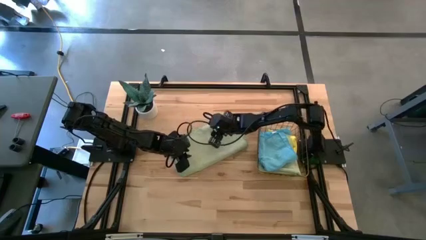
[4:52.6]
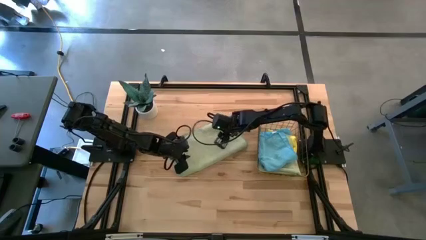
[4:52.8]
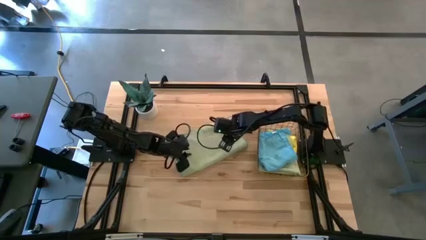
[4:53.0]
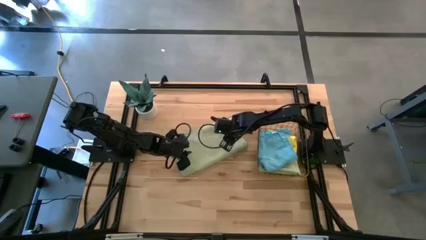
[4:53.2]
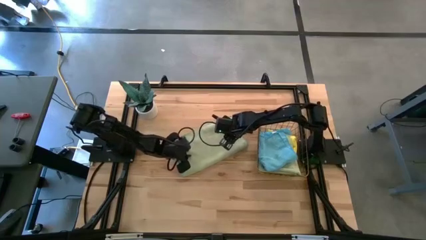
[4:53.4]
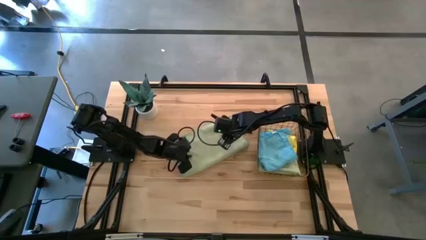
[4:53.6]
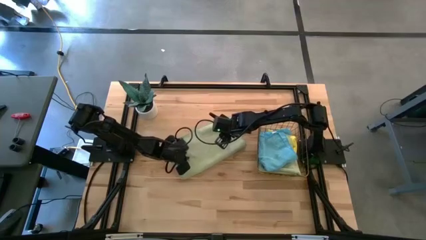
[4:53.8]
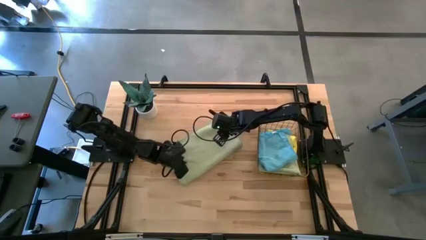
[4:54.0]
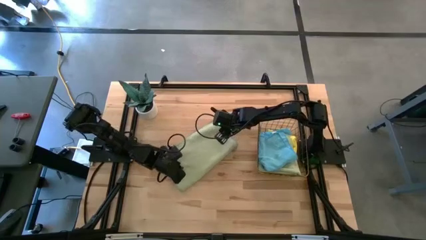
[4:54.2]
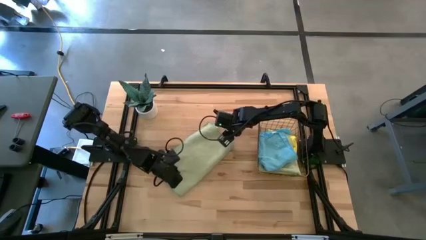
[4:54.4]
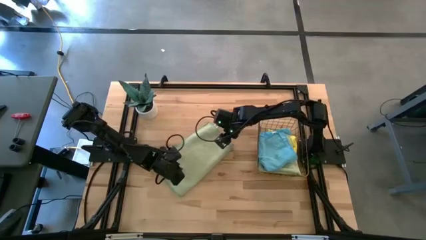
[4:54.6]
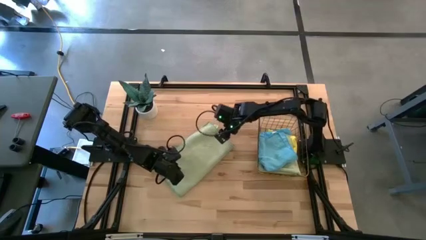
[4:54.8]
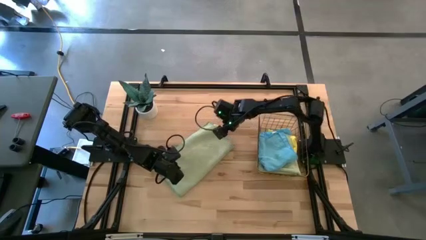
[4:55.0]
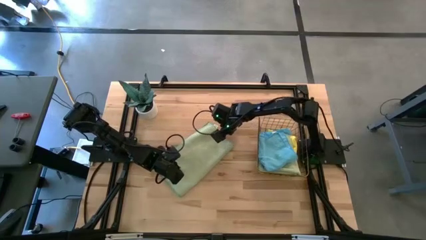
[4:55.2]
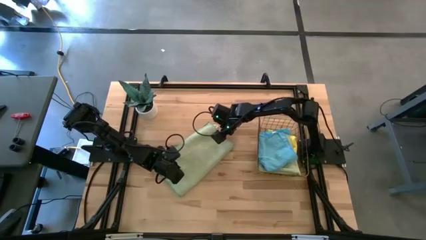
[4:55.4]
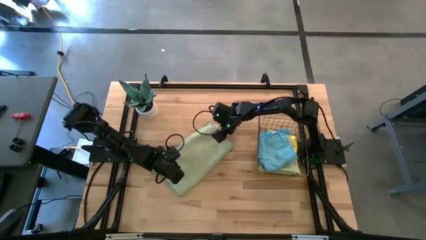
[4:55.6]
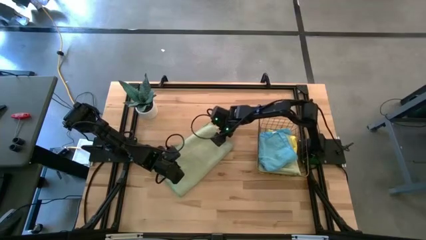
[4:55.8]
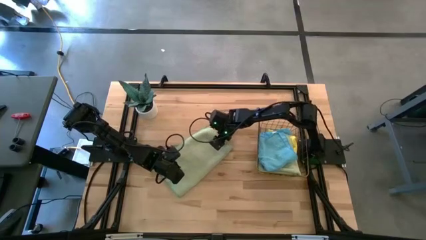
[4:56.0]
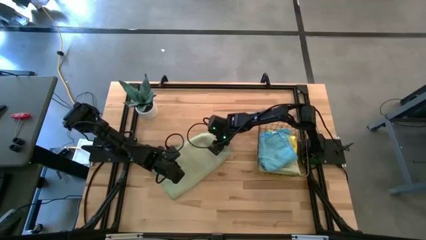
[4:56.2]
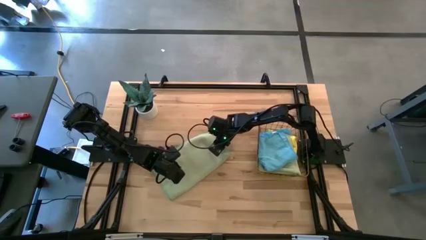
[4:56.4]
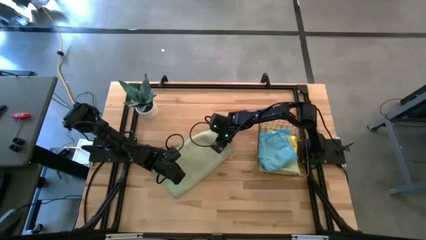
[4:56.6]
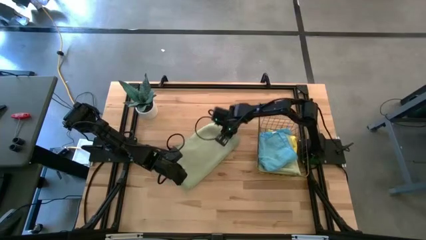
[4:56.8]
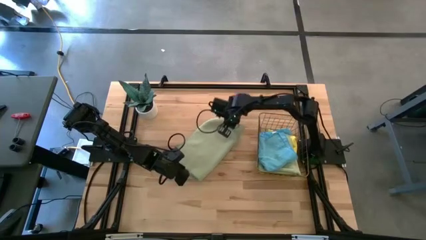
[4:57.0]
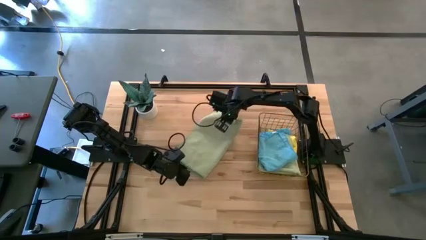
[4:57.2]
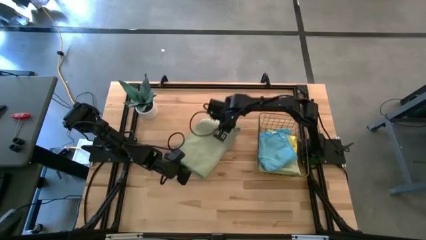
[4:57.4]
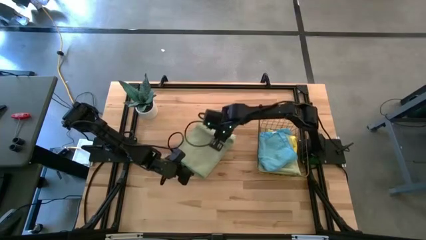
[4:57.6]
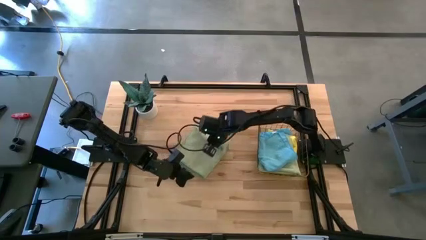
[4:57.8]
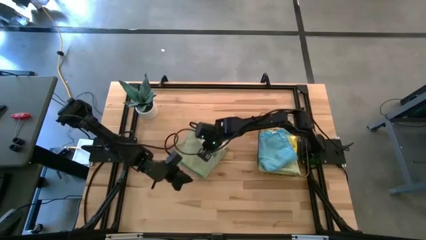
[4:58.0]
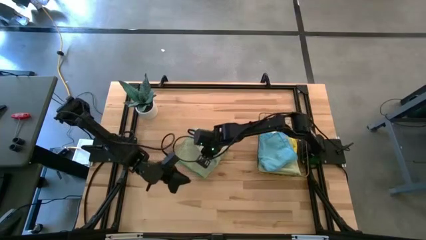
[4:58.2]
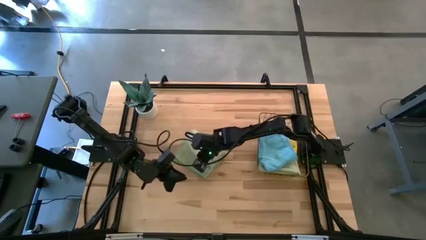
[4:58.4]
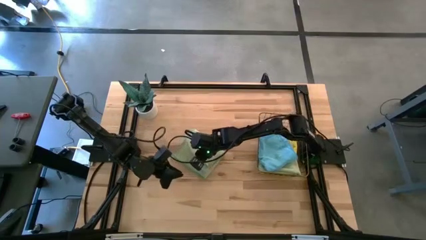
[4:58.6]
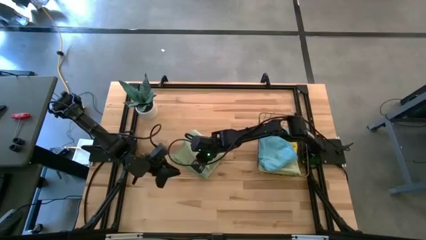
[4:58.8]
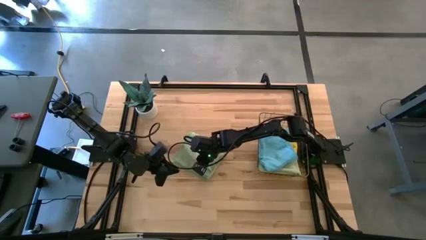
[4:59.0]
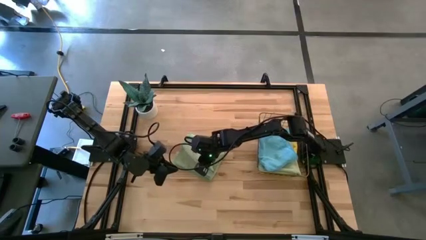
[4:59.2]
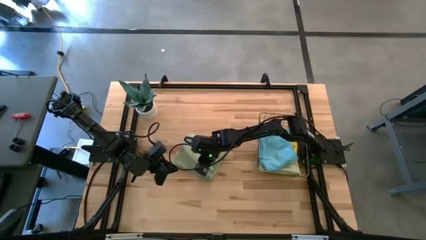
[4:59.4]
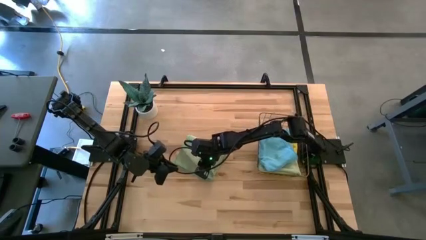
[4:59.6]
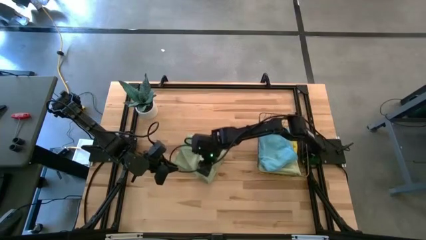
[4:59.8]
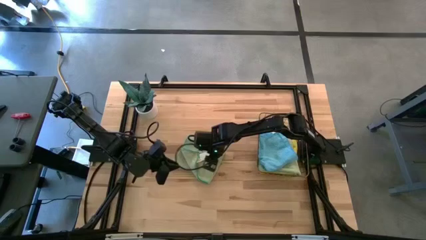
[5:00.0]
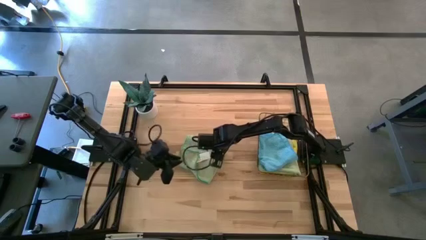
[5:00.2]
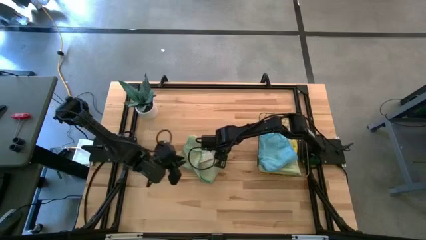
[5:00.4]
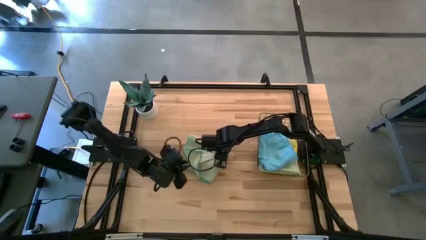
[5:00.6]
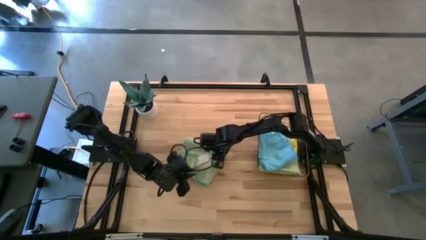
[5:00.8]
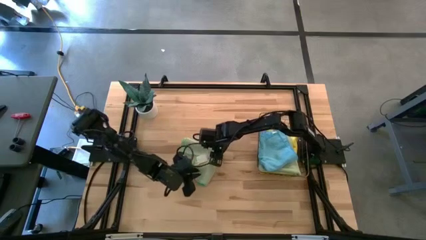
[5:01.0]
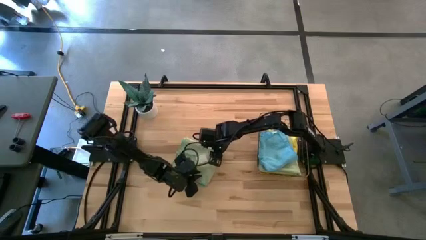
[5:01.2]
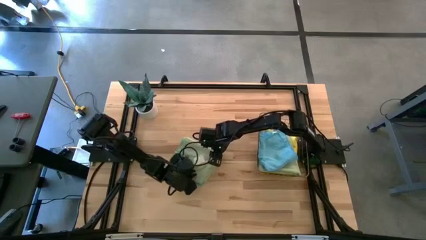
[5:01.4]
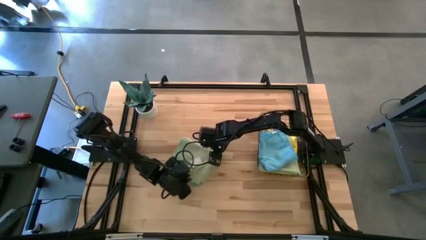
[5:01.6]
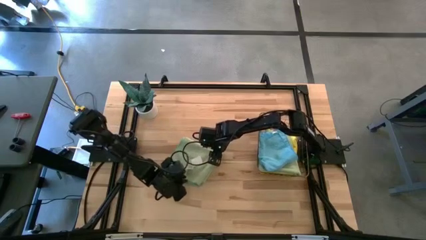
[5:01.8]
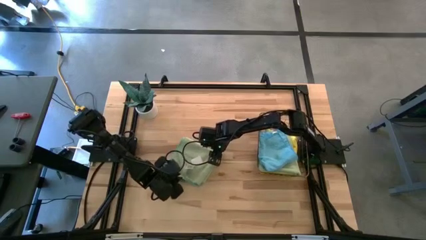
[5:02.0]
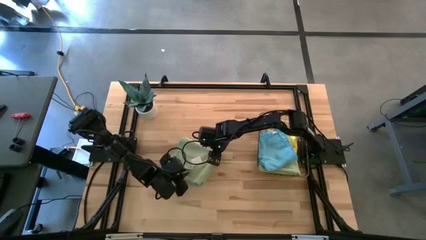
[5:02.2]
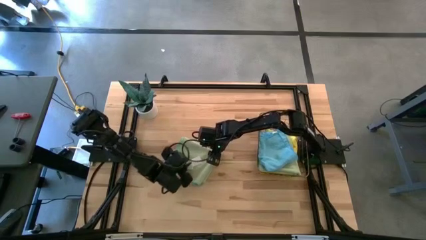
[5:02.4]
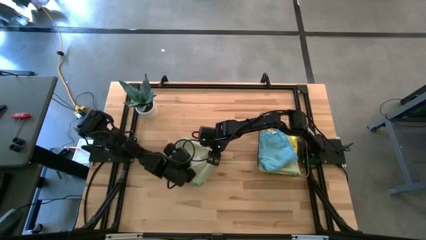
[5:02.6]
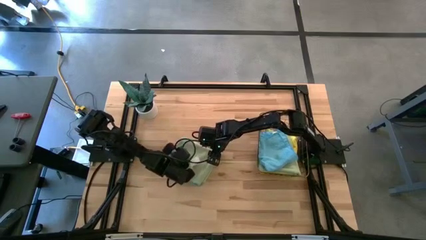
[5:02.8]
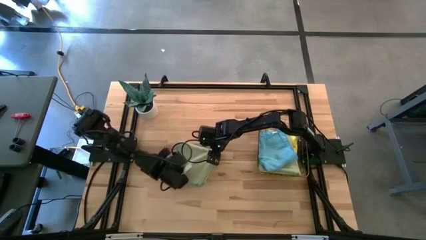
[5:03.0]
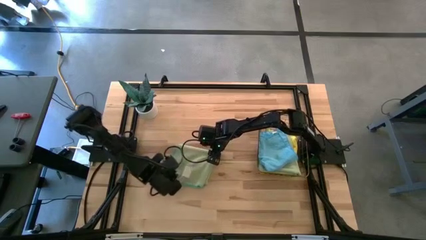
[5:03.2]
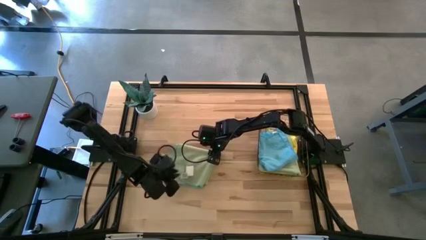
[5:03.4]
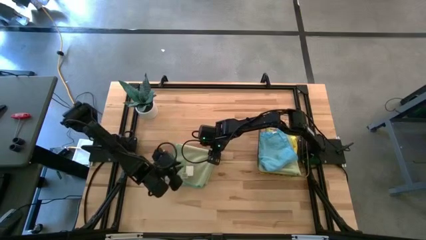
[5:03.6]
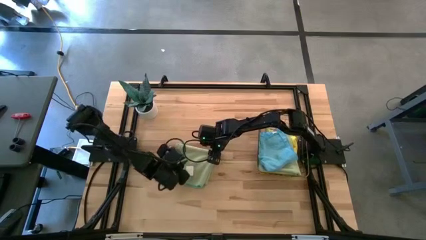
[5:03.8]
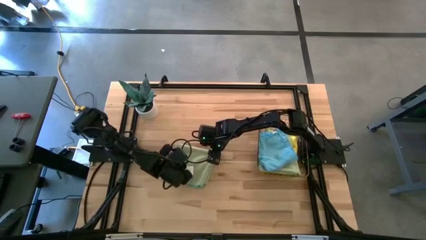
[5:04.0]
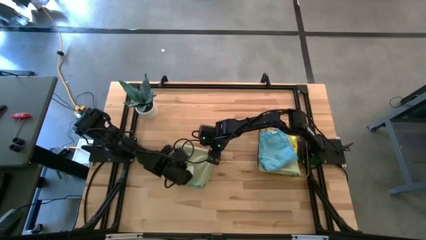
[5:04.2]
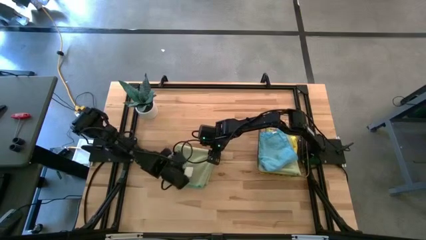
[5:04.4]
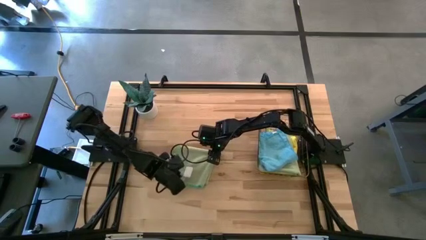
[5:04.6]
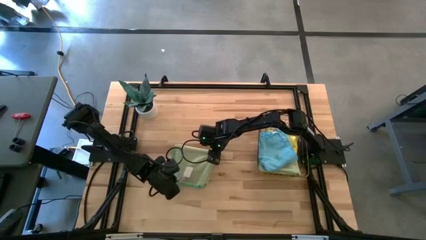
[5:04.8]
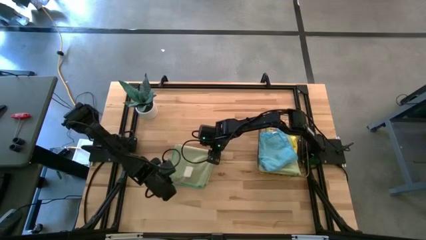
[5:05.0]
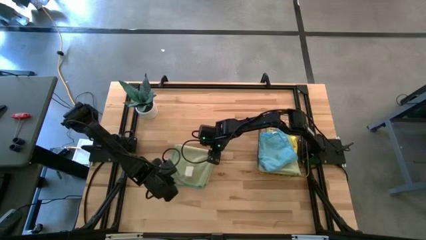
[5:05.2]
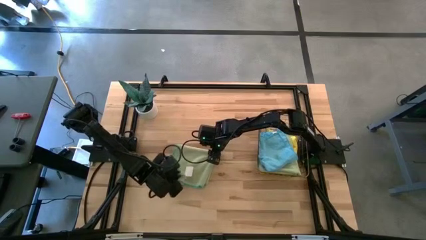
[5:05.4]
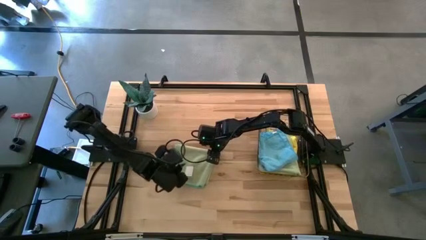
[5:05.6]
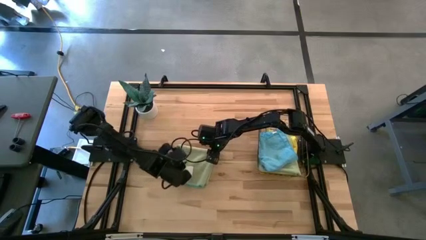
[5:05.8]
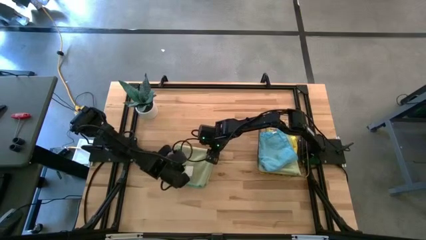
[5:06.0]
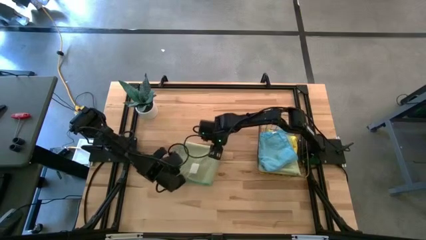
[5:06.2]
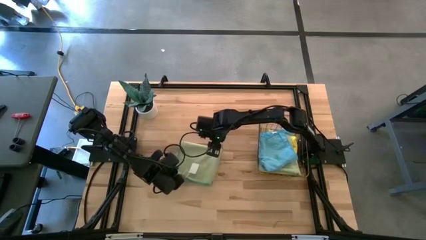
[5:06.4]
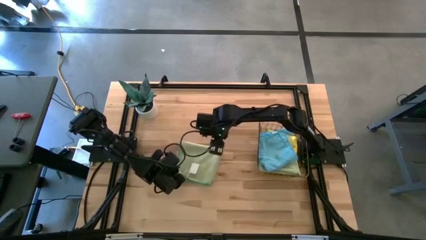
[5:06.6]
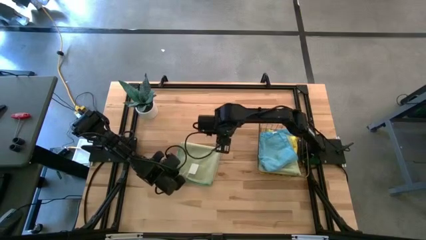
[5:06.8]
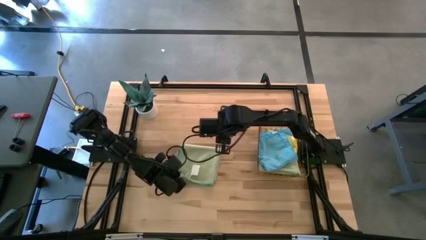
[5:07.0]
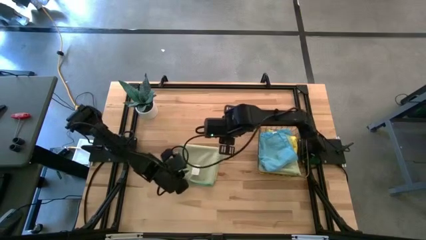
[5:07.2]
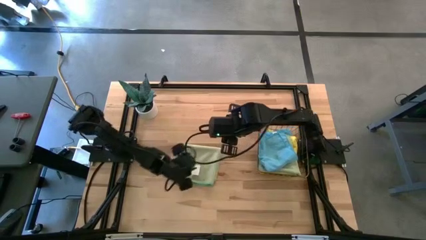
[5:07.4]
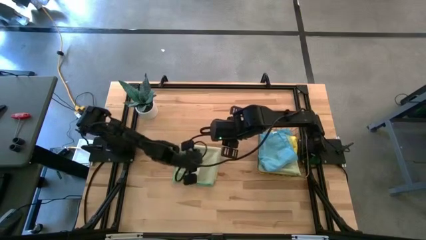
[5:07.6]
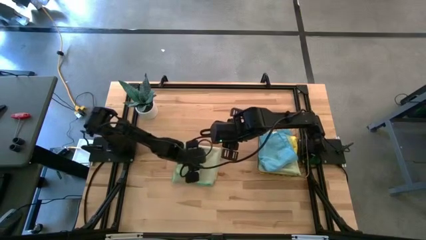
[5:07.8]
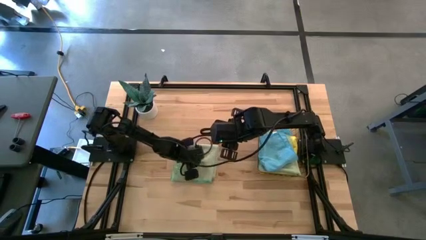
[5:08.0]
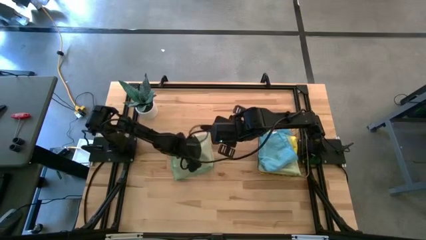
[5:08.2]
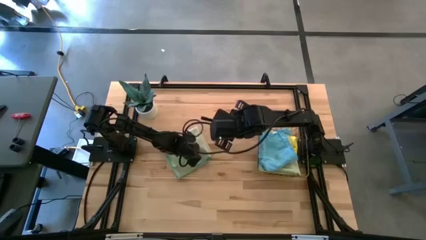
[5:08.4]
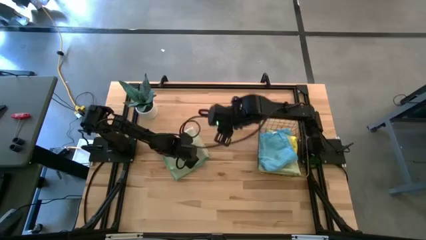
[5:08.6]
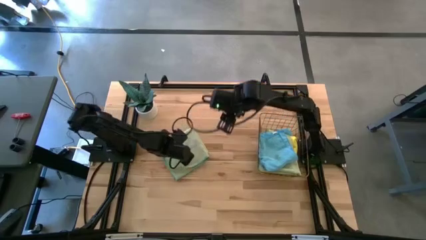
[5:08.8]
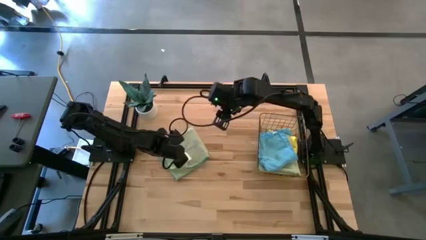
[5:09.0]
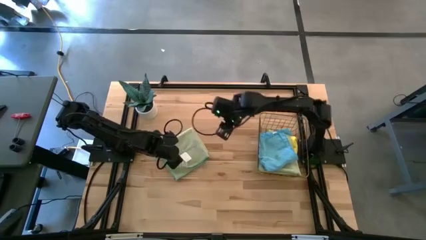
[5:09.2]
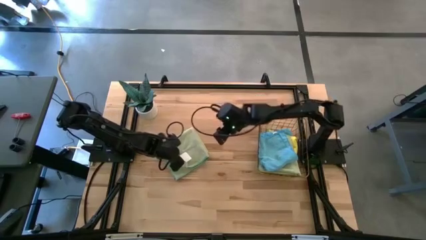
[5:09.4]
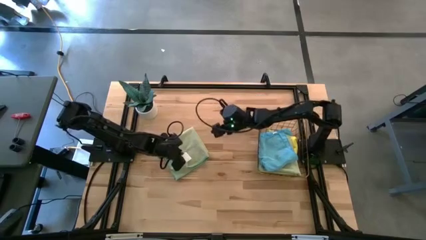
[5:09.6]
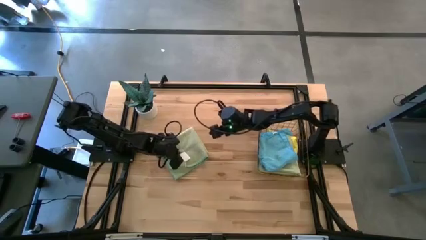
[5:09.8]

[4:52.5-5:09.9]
Task: Fold microfiber towels
Fold the green microfiber cloth
